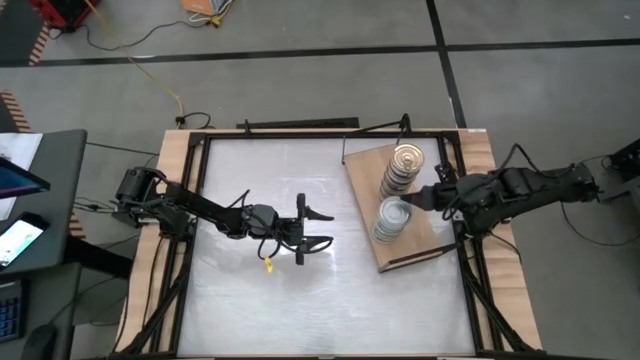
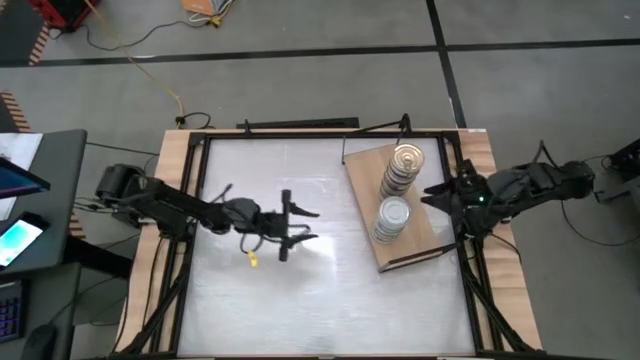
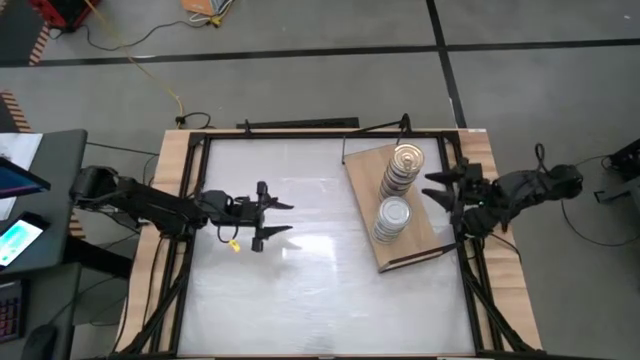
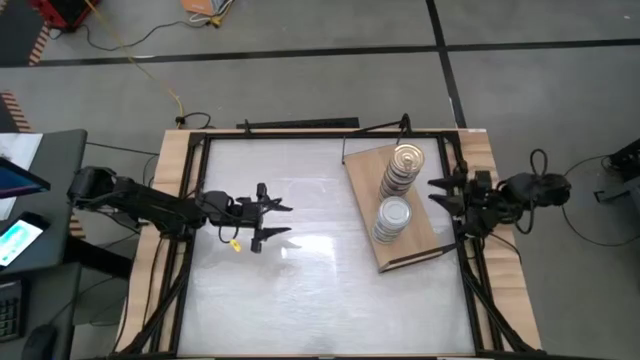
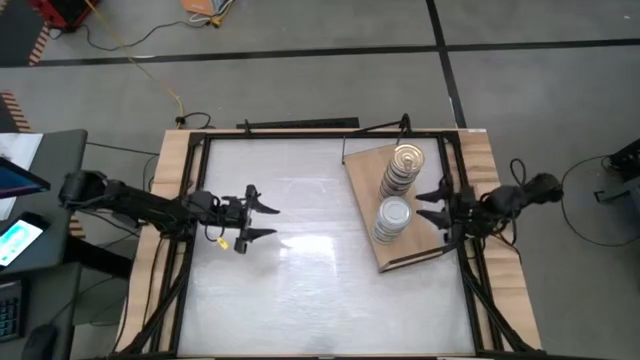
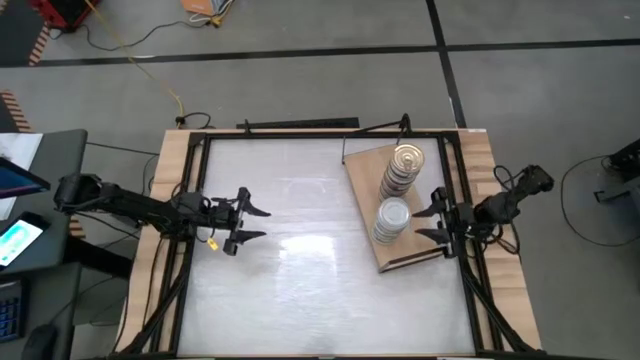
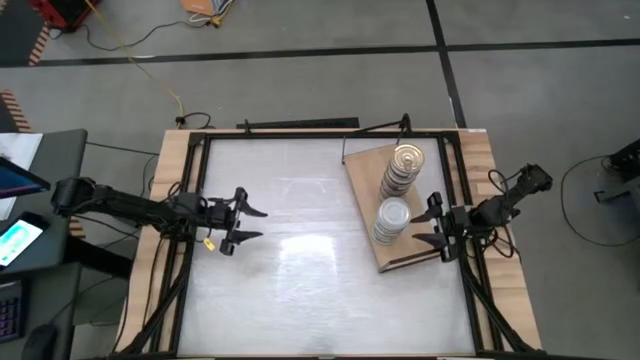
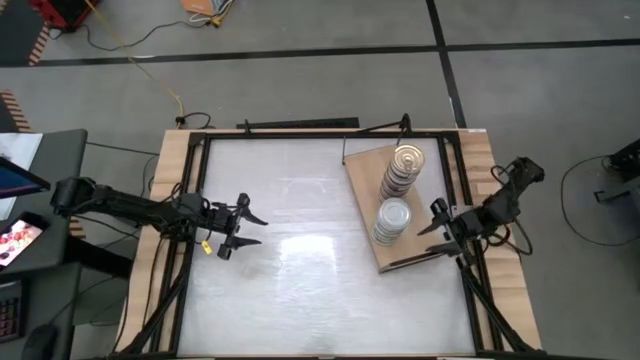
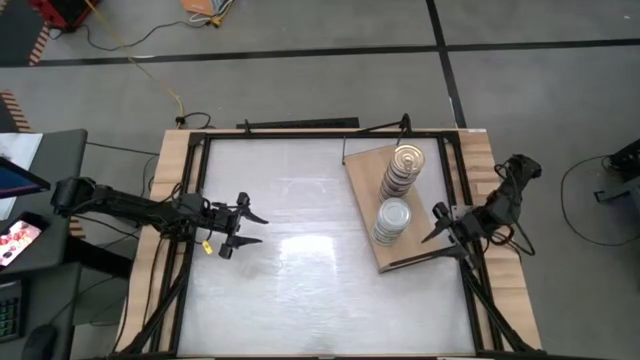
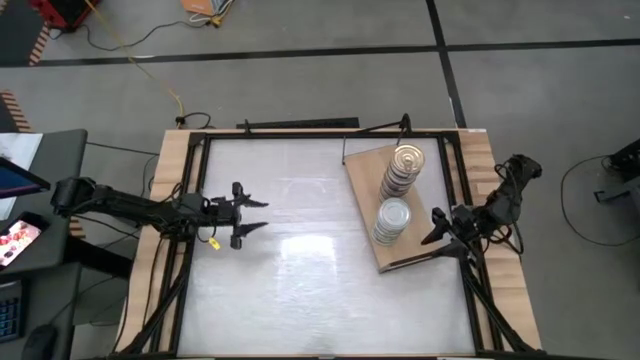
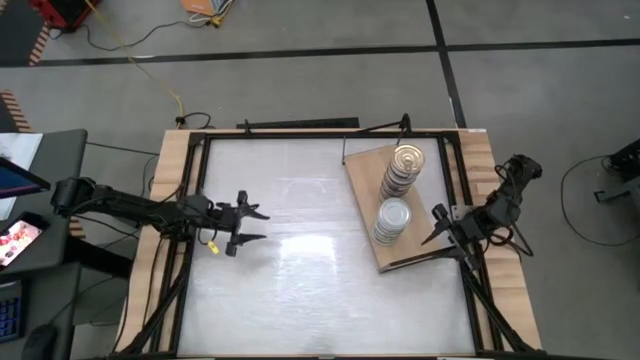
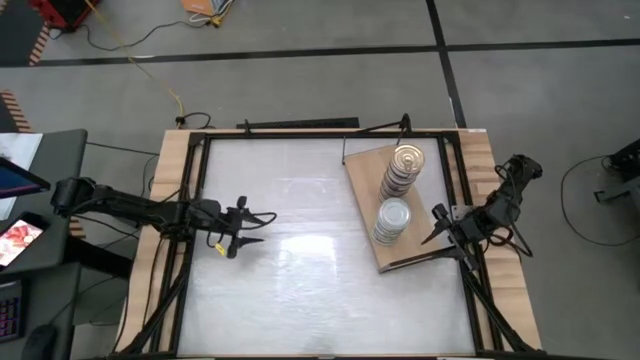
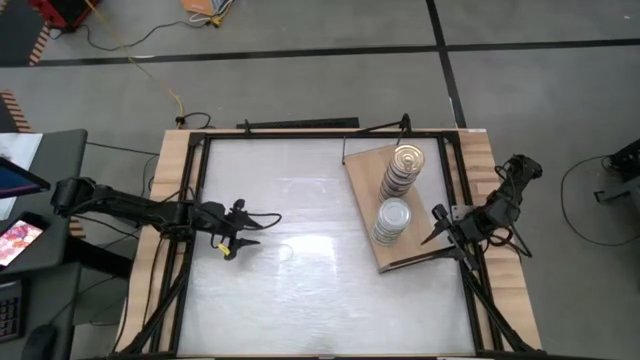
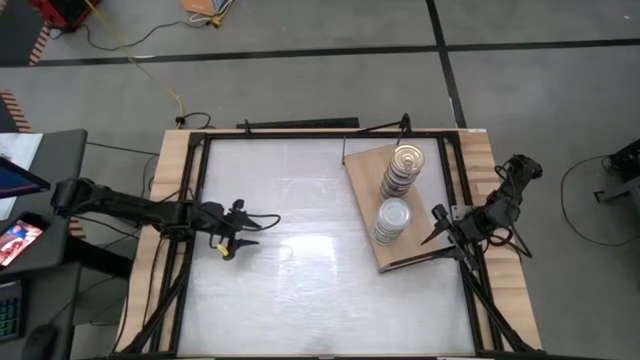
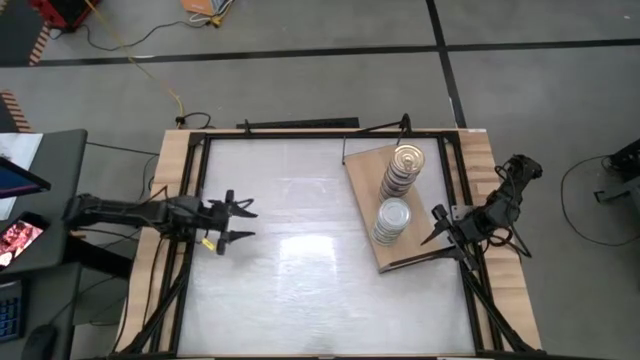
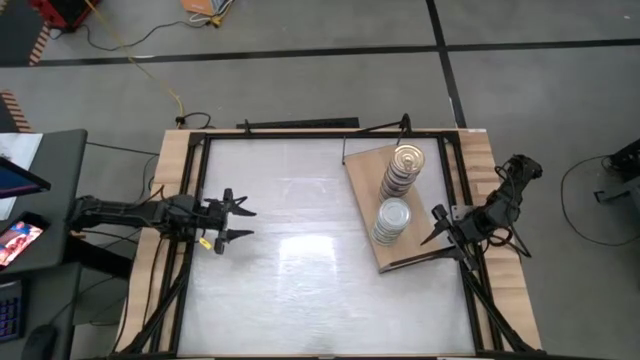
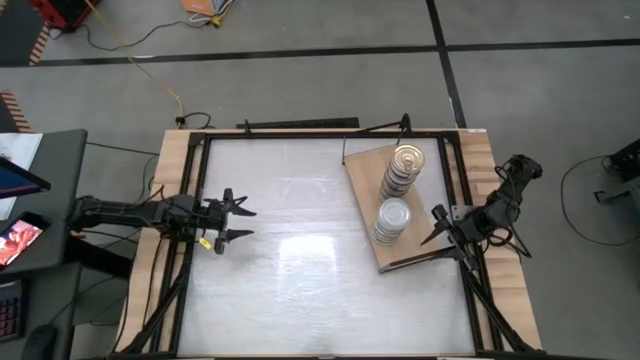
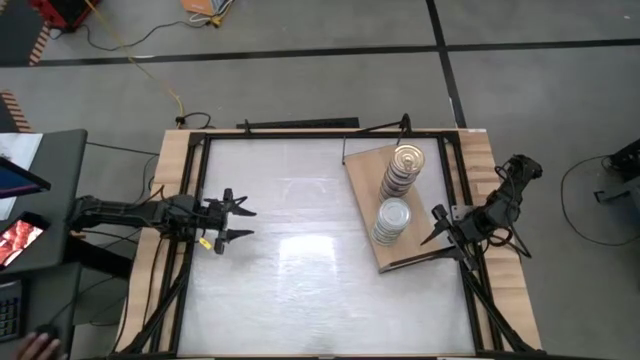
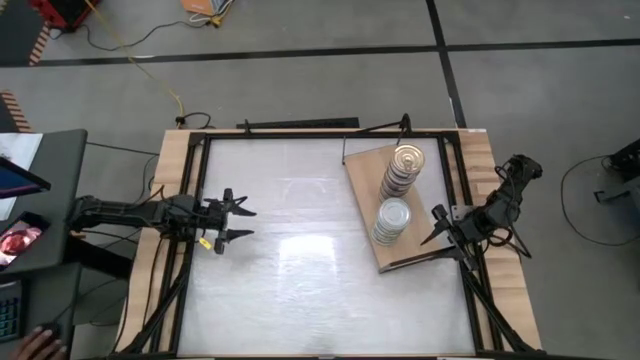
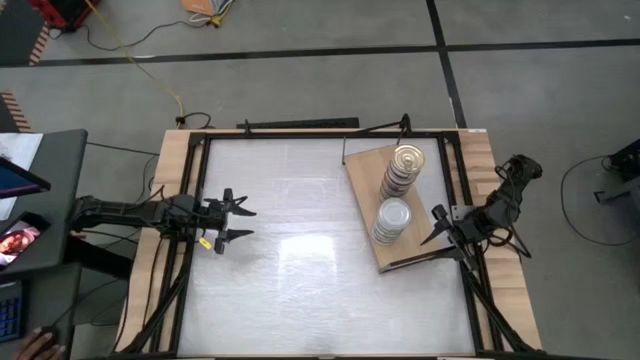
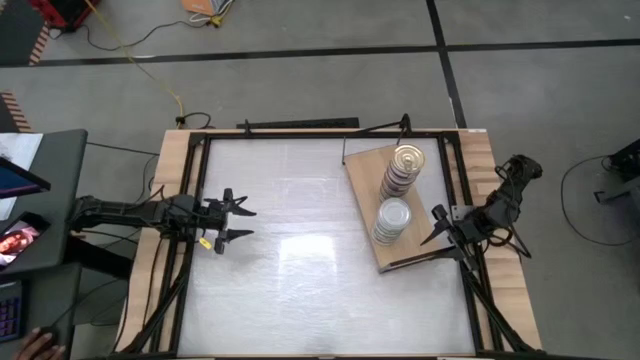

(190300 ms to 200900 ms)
Task: Stack canned seafood by type on shelf
Return to Home Position

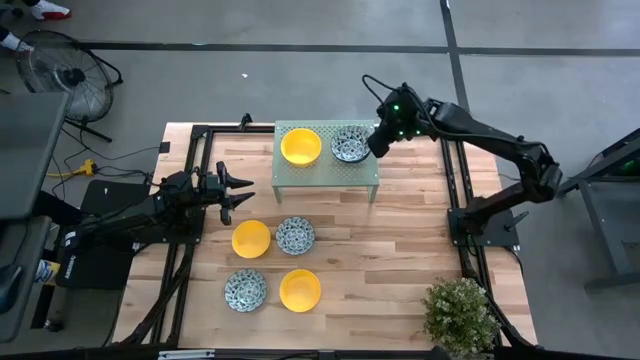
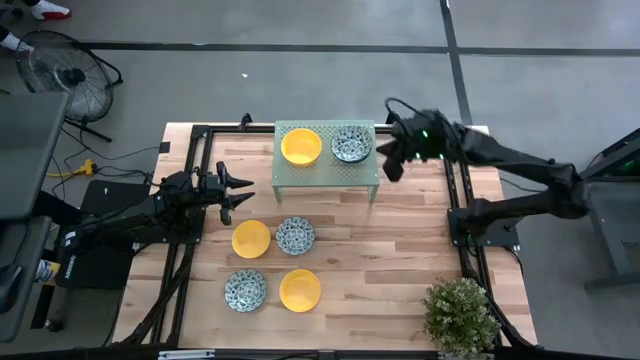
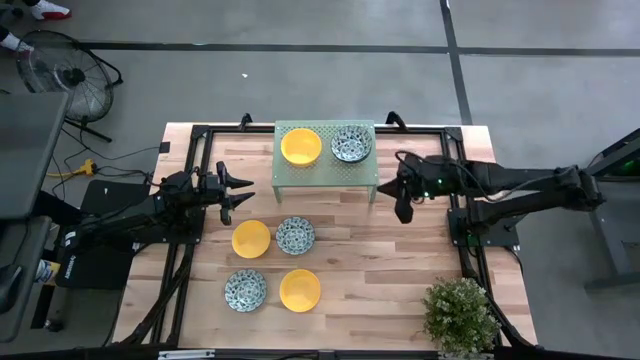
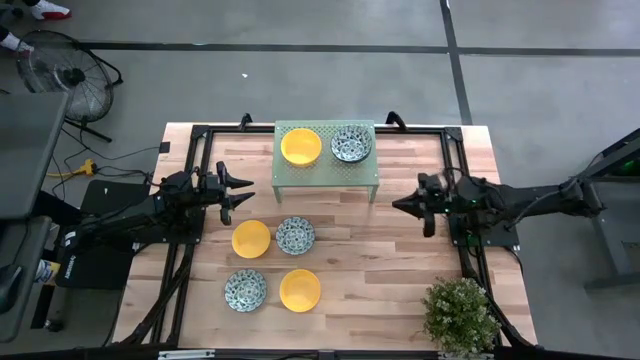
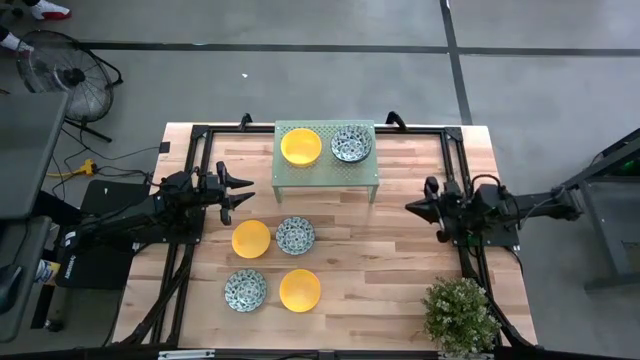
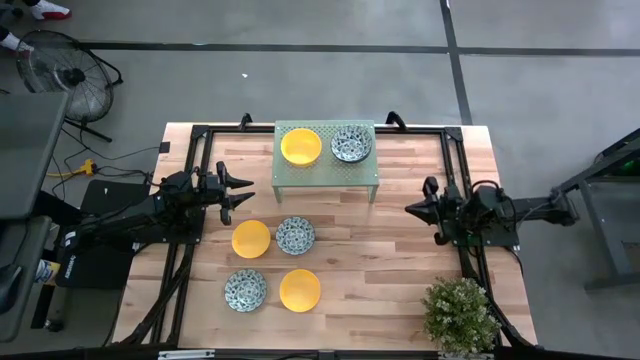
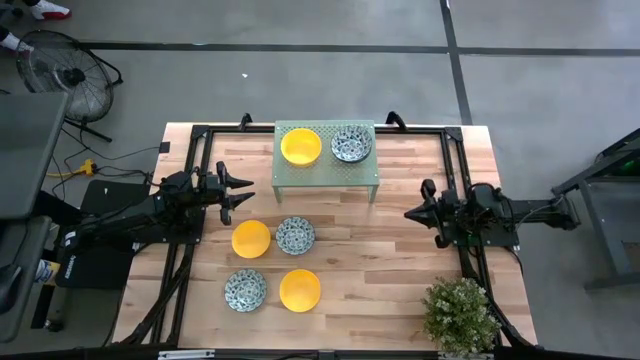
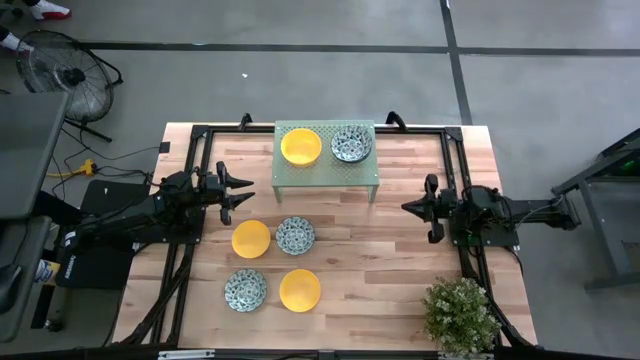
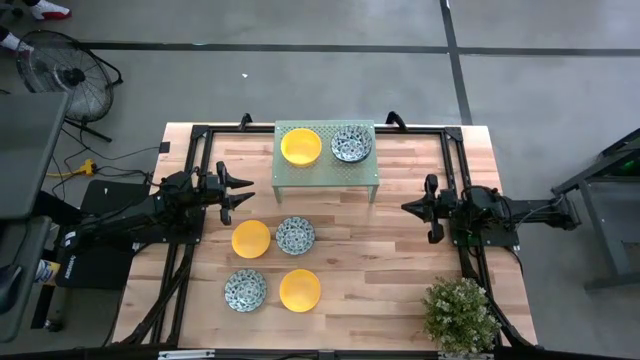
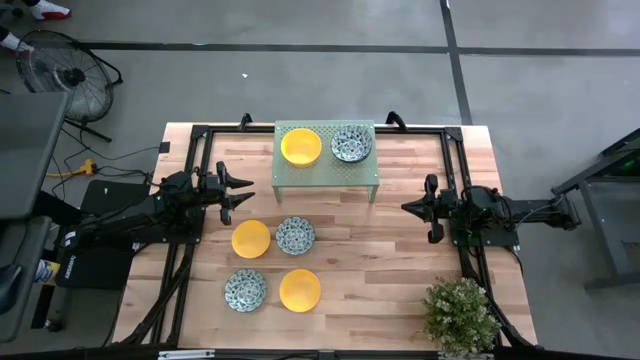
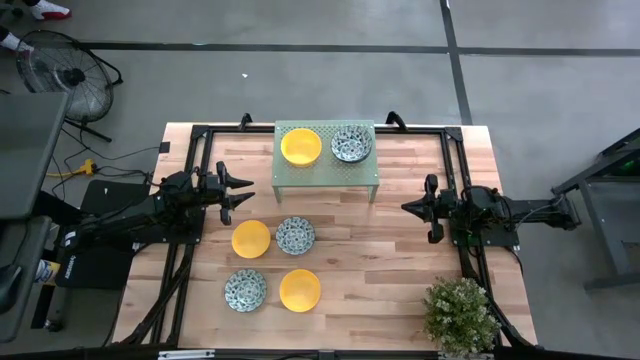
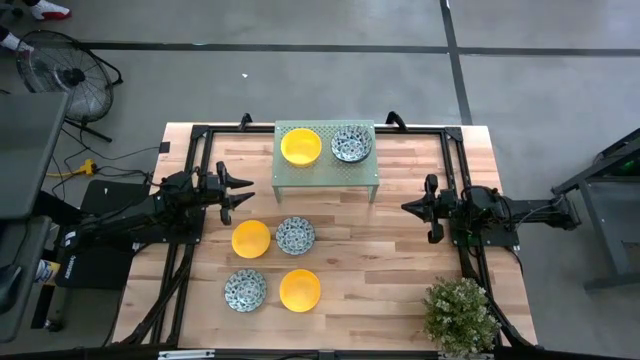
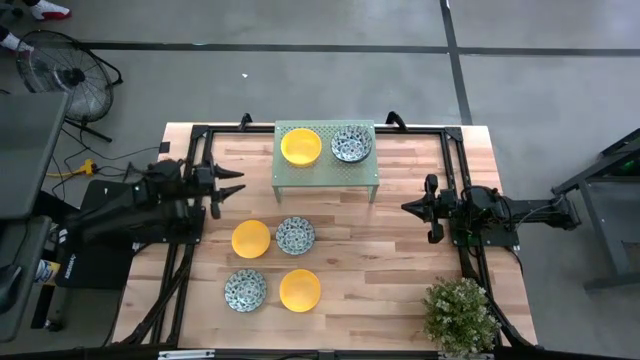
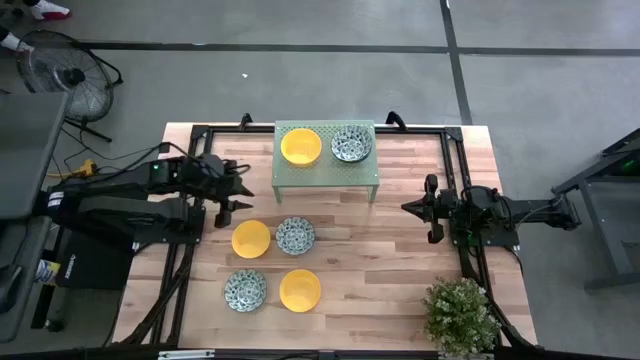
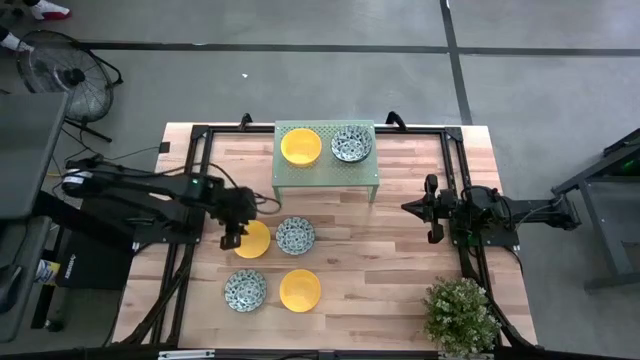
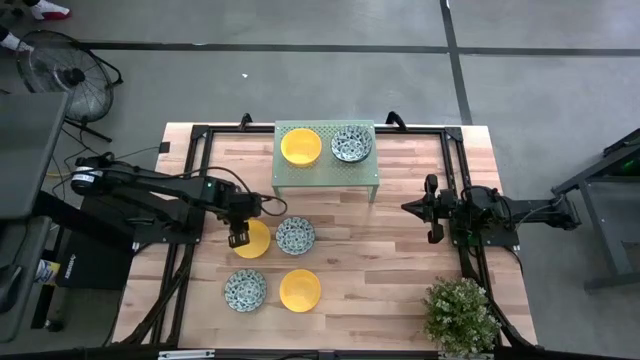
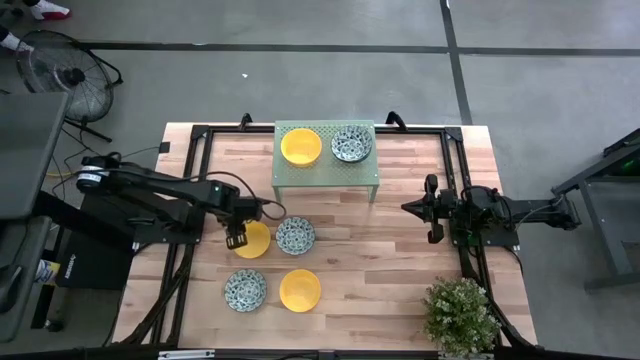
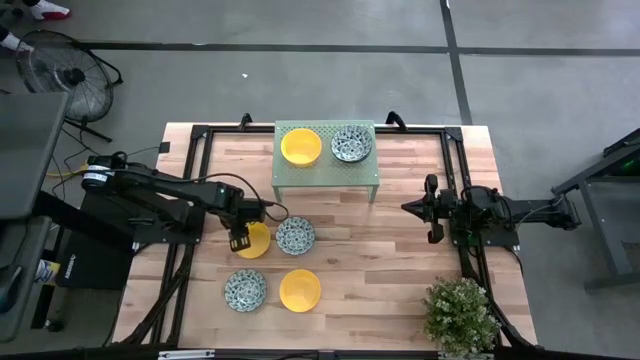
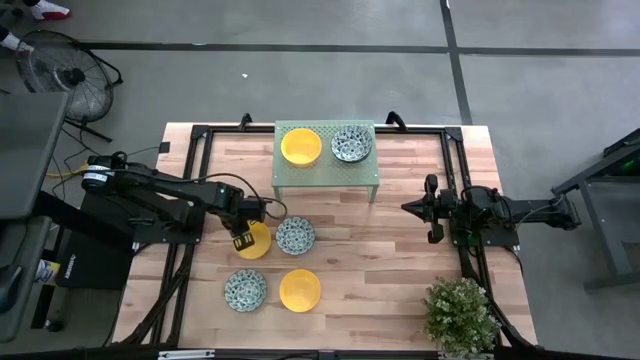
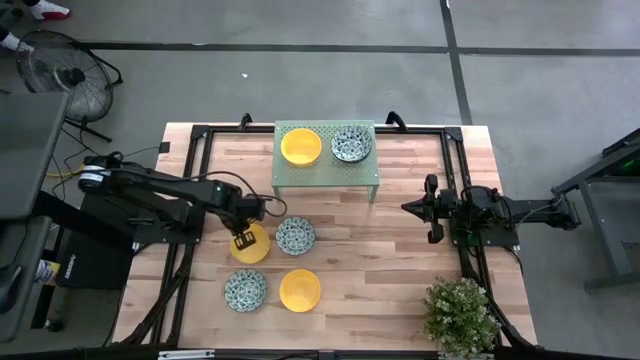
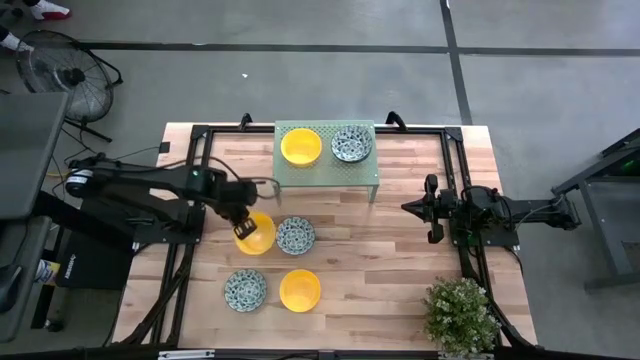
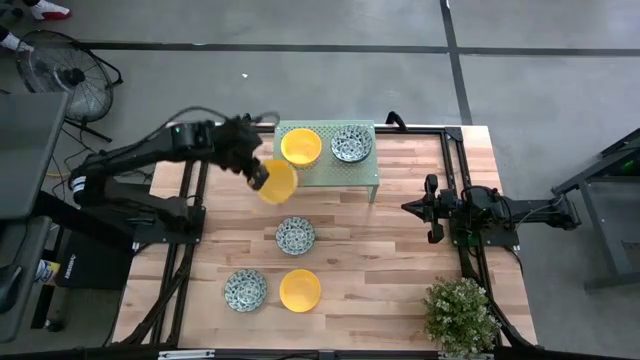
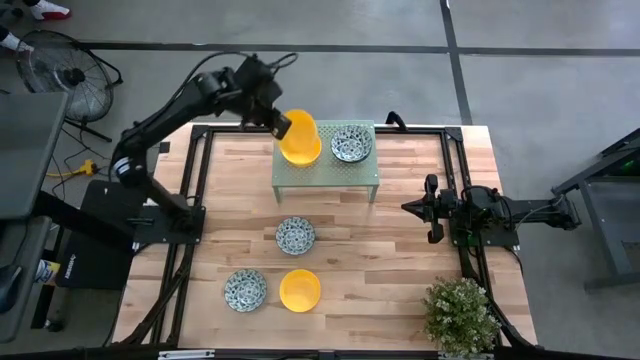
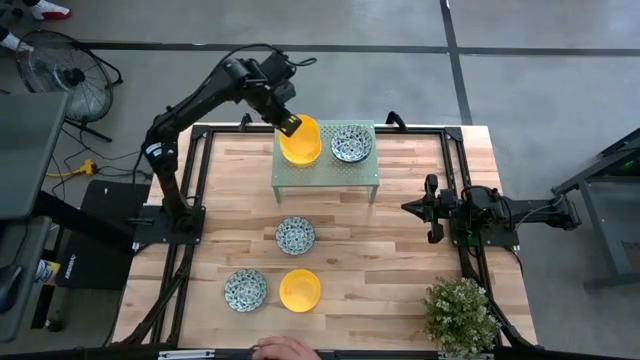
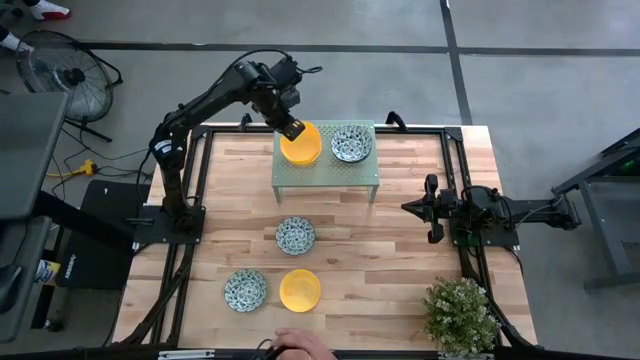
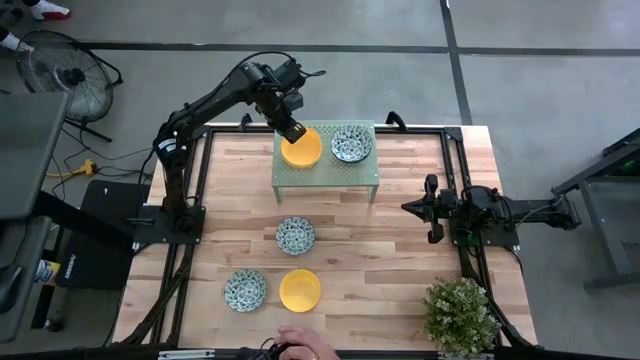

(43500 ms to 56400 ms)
Task: Pick & Place Mini bowls
Stack the yellow bowl on the stacked yellow bowls on the shelf
